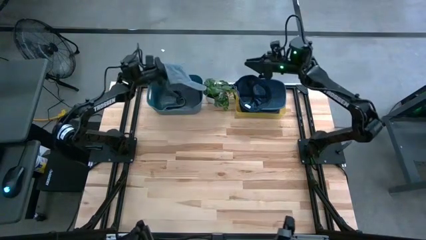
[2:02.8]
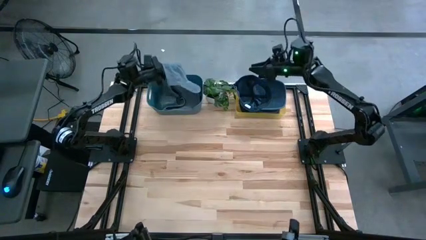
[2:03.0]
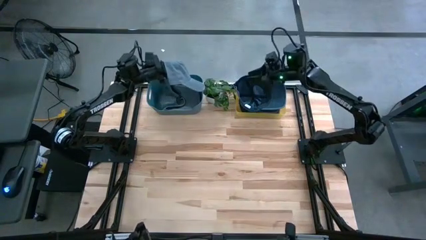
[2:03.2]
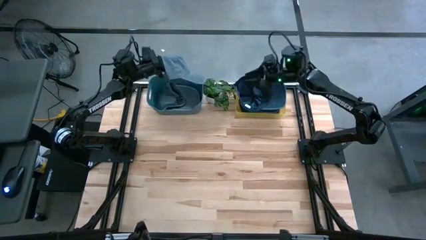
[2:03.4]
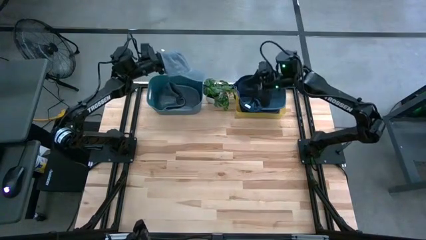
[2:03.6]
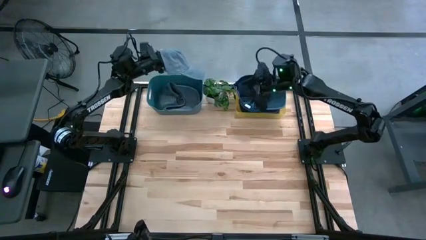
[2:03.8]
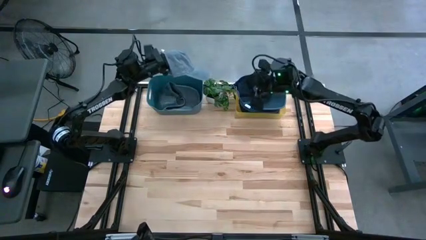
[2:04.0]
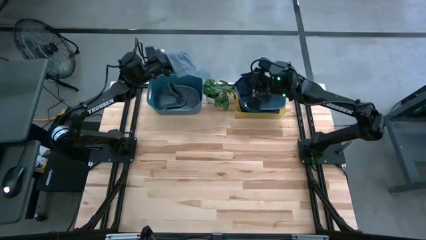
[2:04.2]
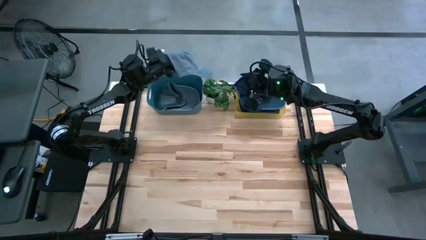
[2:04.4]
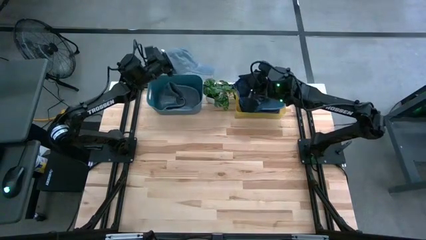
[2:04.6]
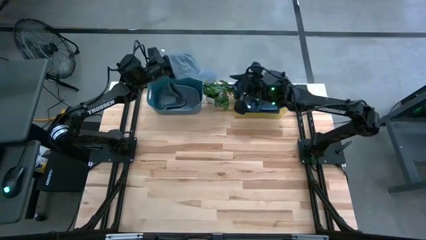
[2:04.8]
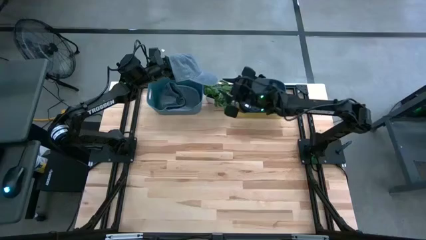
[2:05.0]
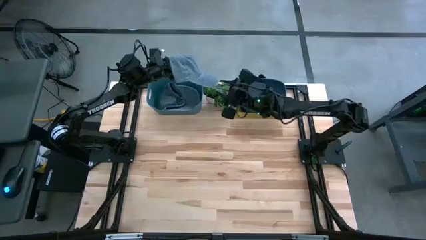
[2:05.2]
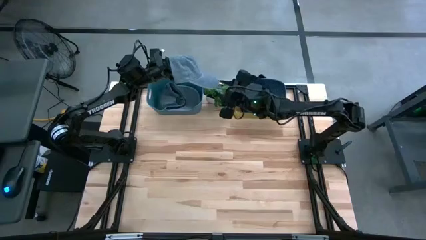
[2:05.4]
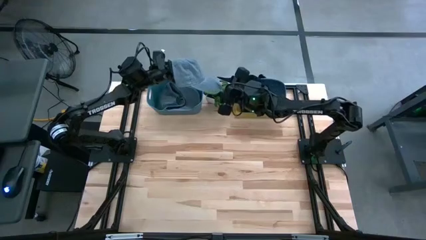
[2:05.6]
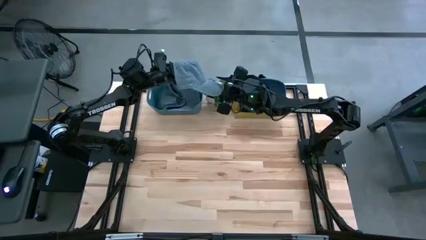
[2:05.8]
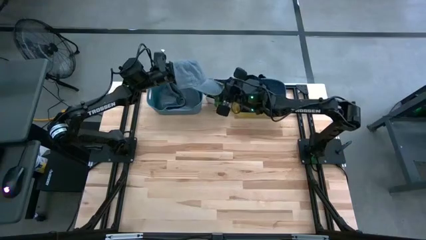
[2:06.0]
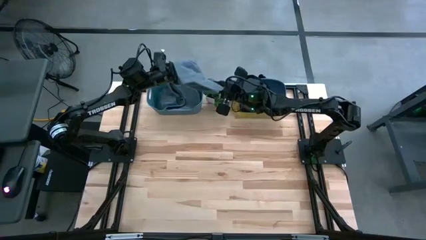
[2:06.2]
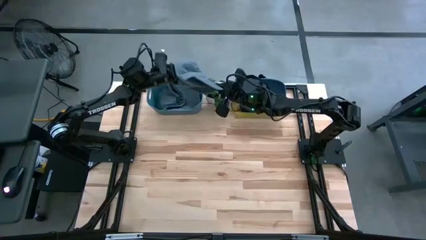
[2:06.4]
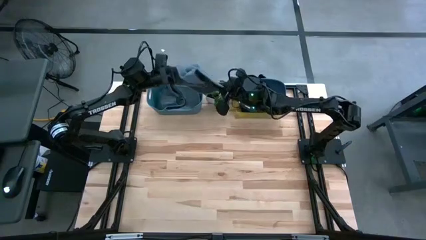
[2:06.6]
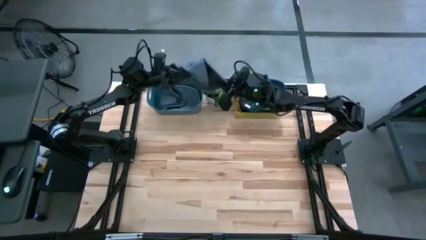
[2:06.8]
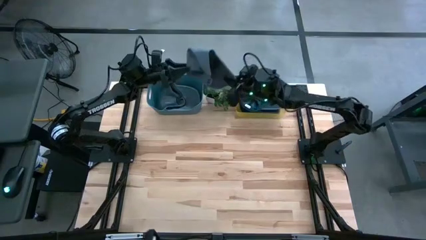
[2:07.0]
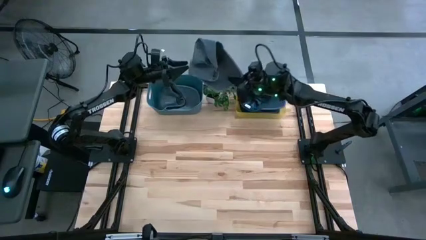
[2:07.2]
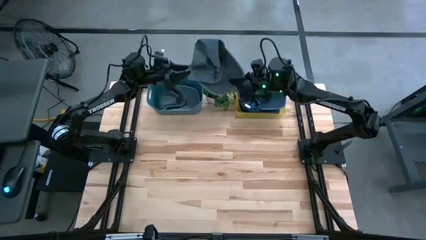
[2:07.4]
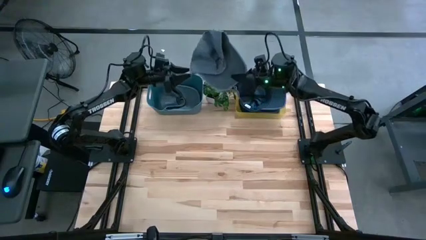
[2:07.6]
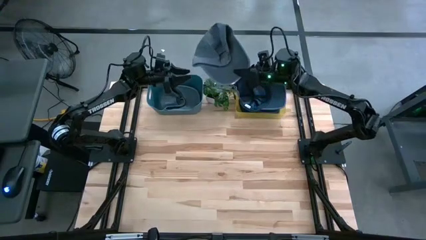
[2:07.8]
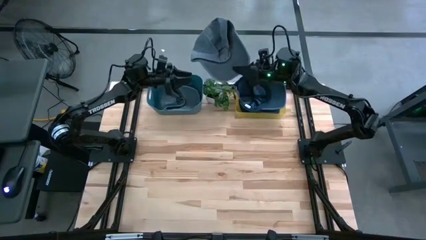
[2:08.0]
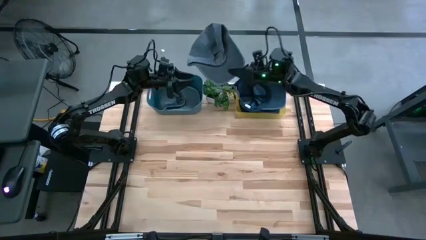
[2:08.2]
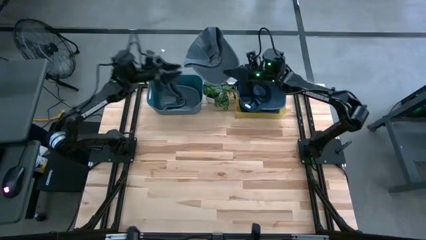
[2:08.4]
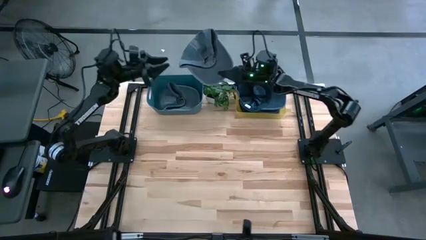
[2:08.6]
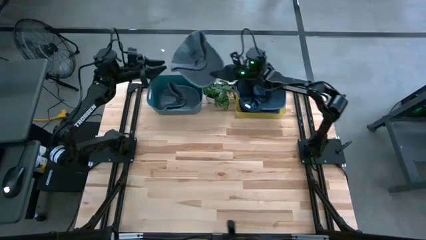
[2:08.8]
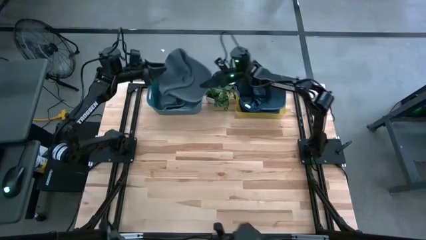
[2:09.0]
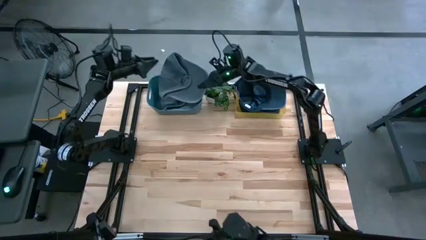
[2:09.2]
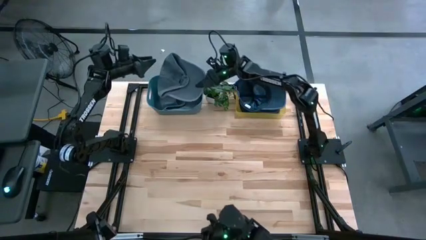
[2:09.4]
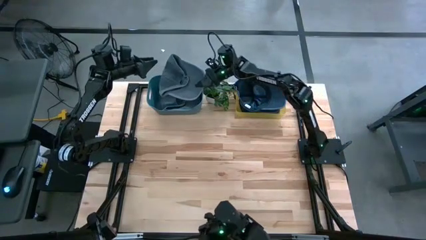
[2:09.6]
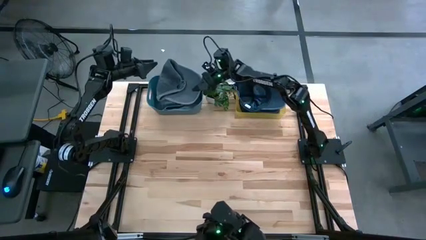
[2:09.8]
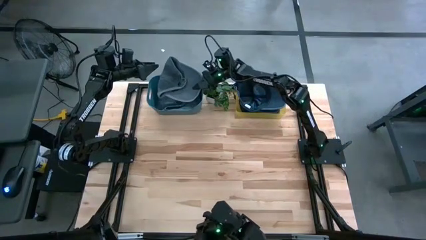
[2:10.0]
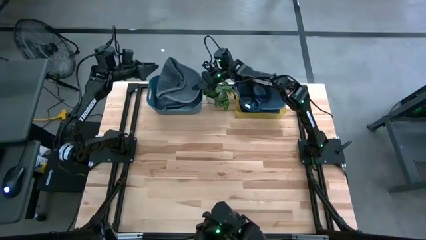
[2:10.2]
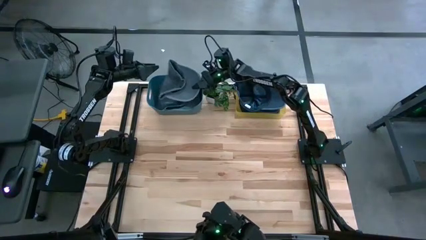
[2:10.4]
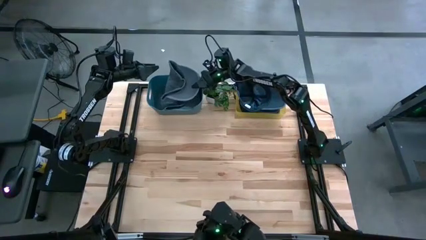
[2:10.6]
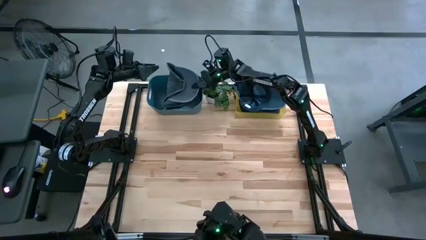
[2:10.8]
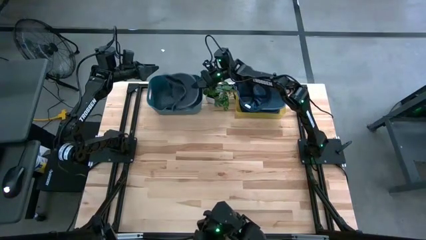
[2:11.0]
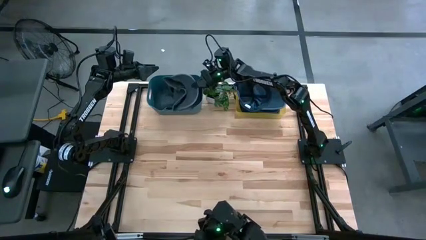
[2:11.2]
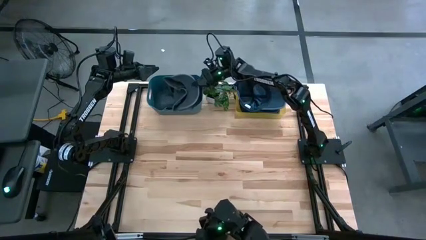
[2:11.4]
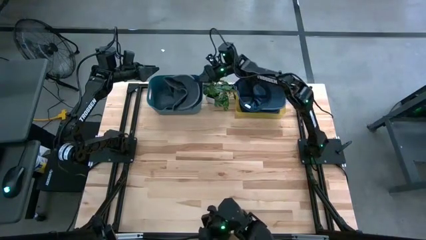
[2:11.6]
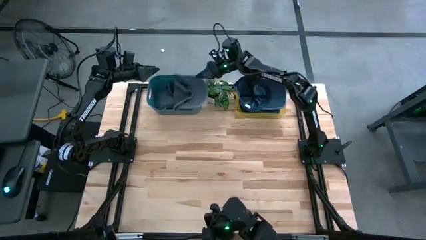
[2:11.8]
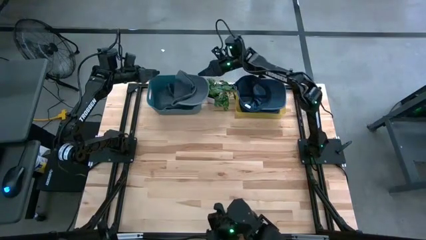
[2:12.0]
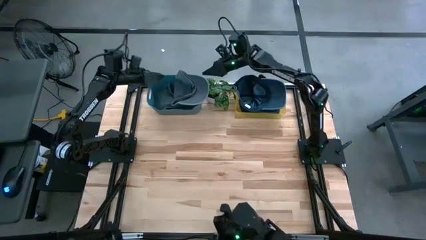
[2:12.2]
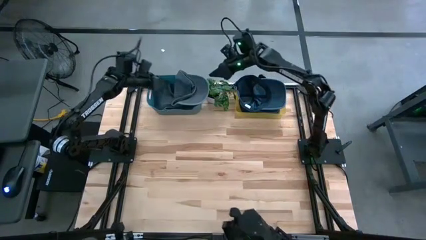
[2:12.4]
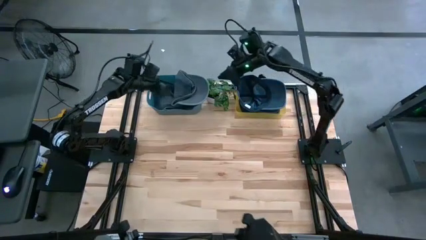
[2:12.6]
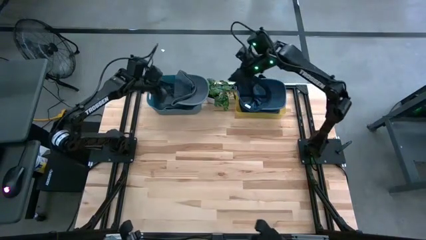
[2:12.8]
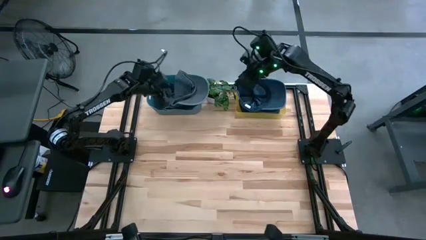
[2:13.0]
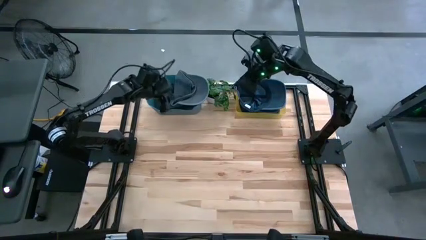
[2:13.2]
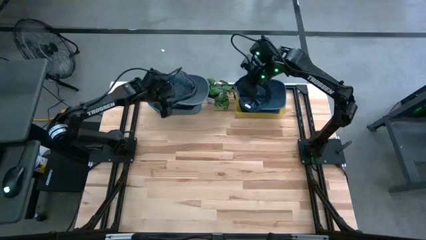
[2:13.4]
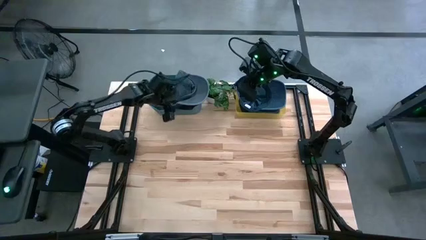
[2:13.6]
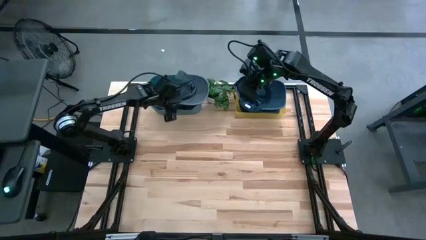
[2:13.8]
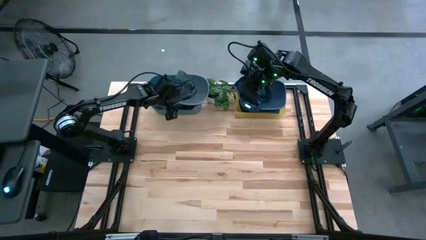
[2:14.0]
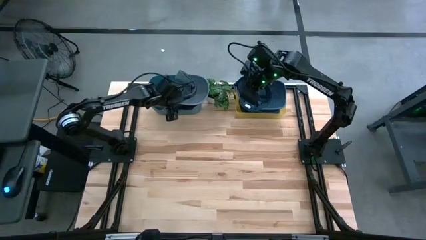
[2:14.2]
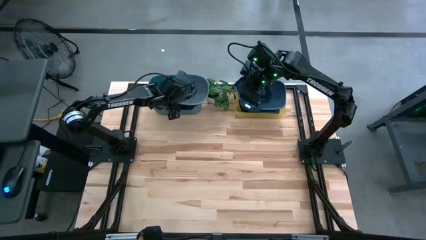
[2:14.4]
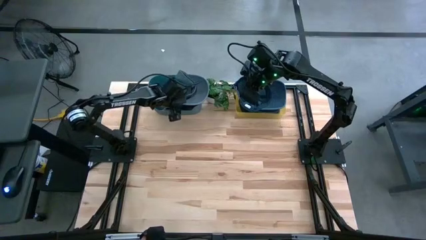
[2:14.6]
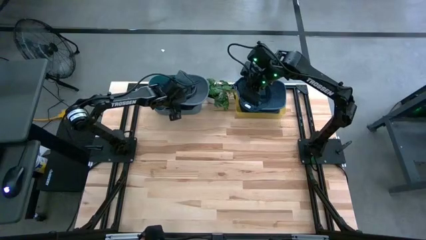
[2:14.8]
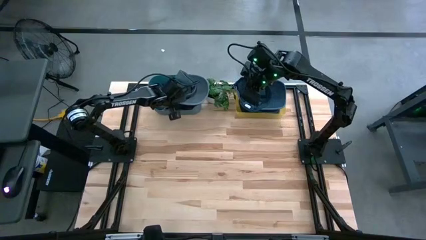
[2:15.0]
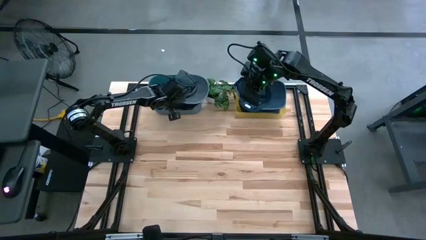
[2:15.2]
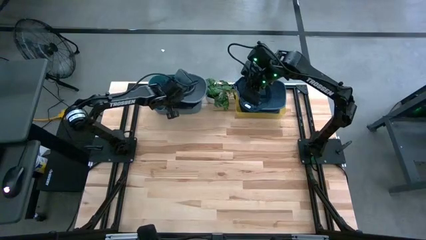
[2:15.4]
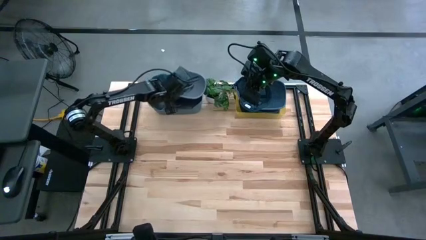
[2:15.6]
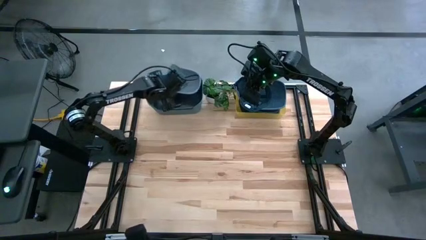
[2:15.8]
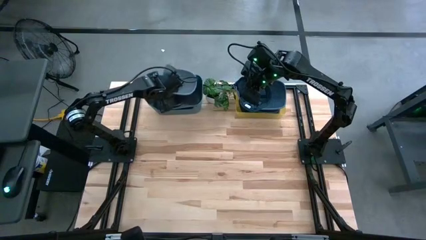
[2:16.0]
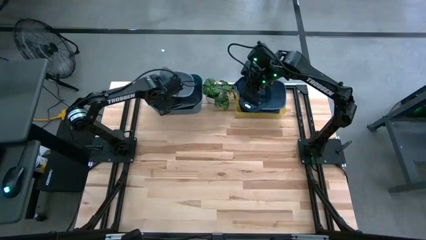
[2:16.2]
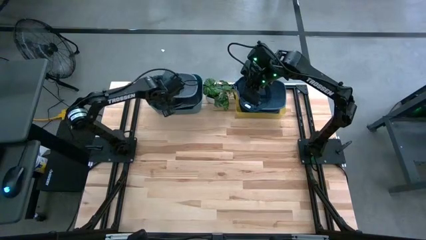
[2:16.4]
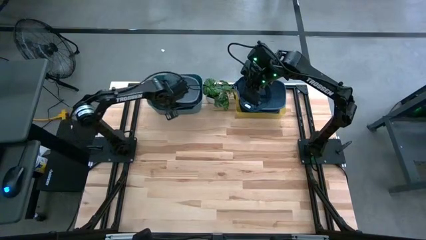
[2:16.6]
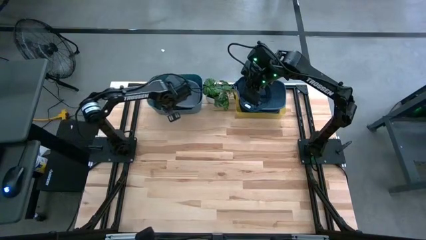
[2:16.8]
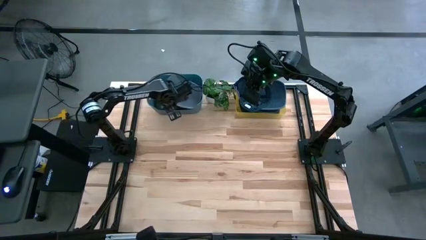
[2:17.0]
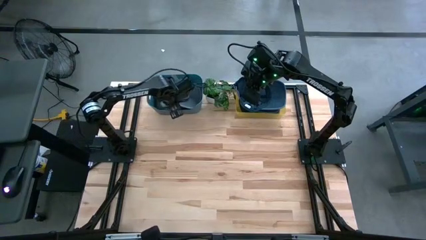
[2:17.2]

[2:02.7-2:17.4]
Task: Pick & Place hat
Put the gray cap into the green bin

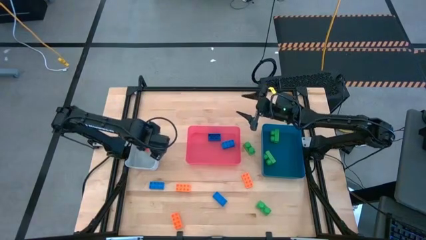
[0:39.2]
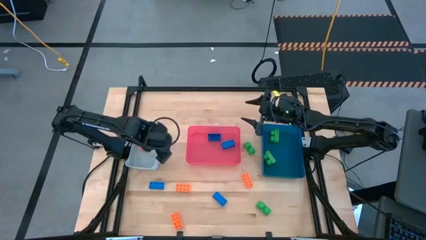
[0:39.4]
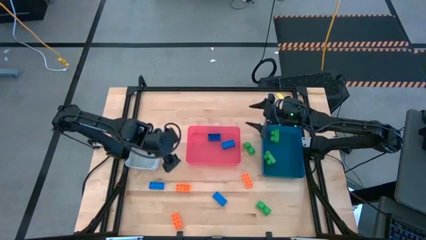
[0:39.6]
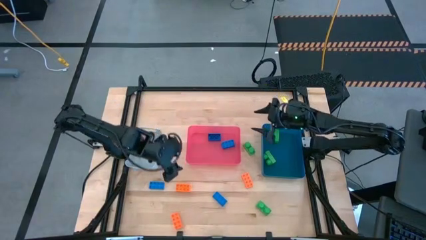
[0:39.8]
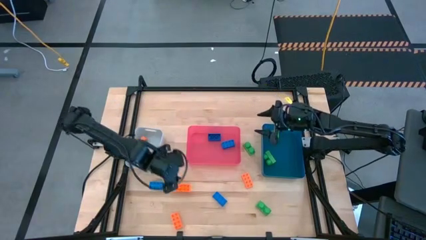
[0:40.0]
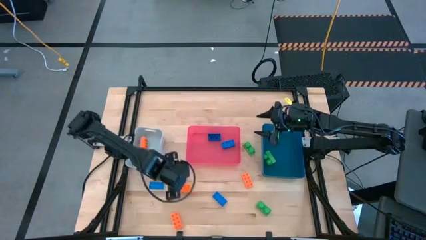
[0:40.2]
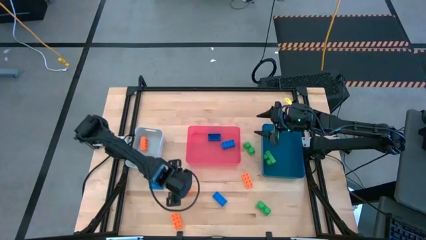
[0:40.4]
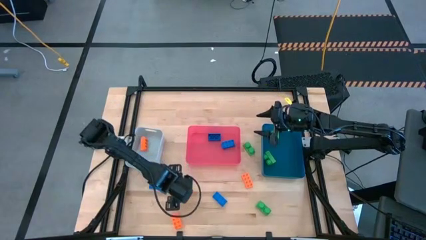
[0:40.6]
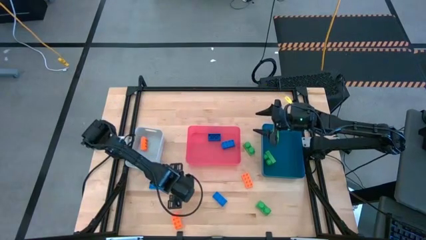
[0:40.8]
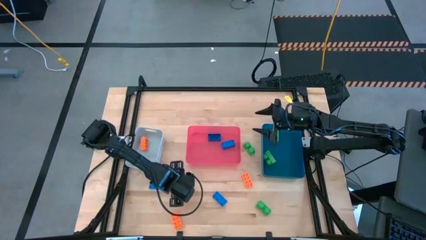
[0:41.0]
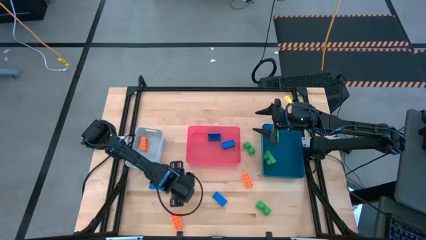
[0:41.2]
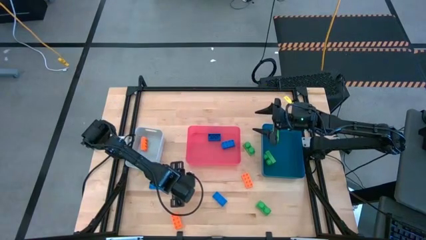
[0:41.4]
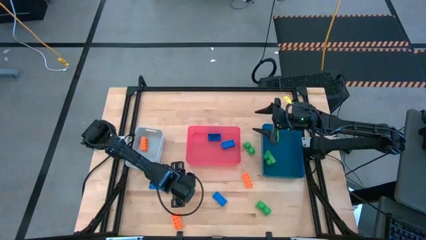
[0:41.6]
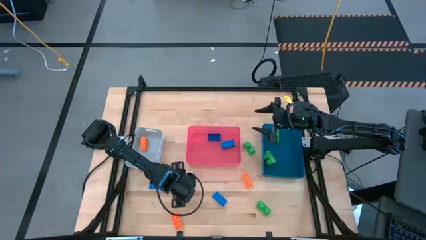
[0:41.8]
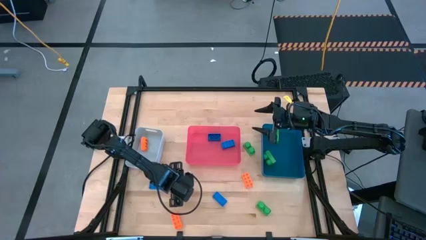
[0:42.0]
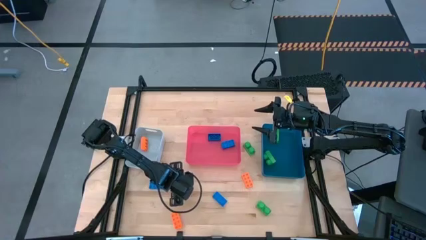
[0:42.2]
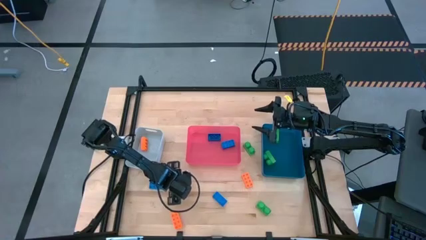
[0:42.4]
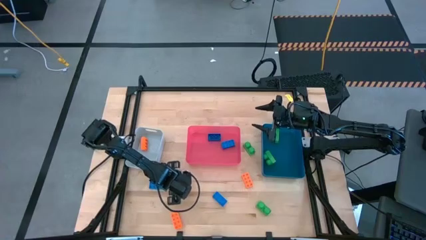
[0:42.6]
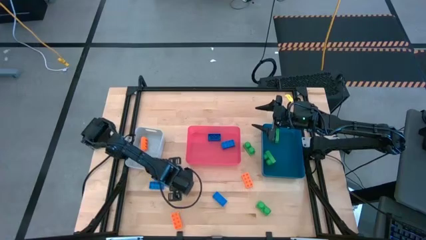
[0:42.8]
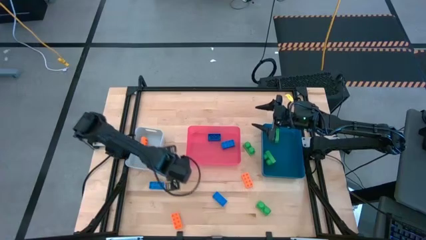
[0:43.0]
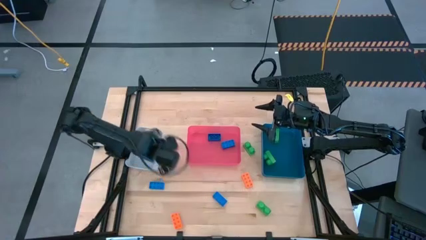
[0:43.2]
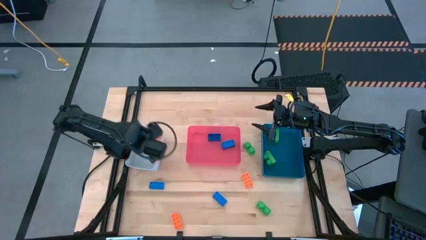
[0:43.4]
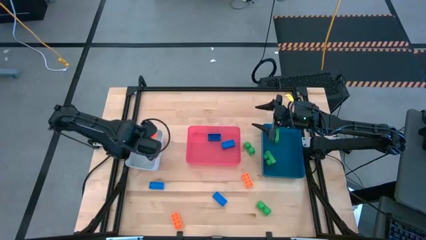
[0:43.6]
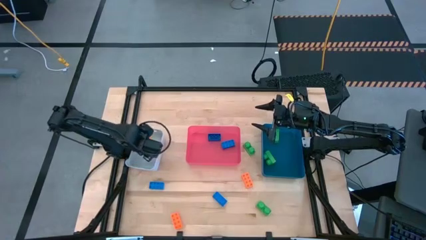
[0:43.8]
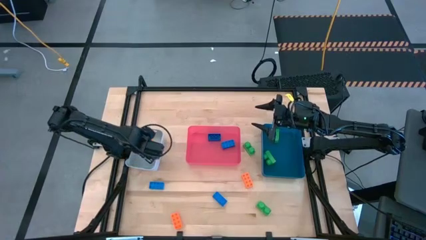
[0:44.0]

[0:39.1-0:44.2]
Task: Sort & place blocks by color
Put the orange game piece into the gray bin
